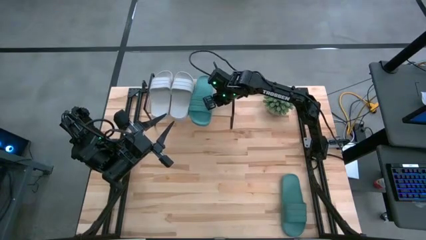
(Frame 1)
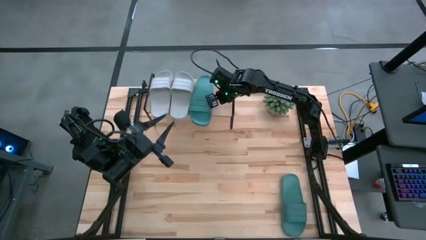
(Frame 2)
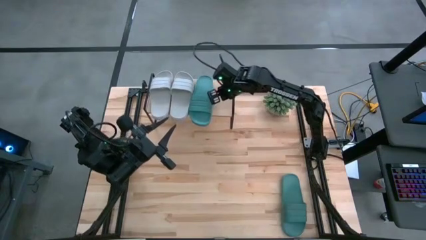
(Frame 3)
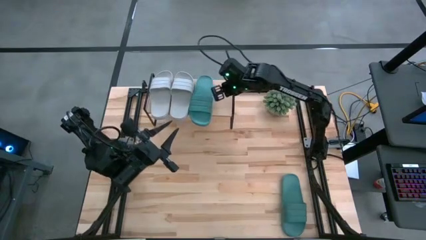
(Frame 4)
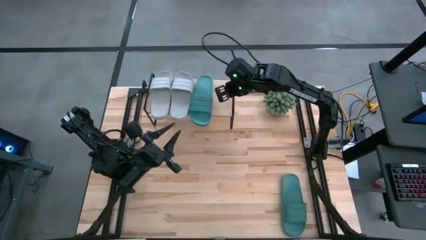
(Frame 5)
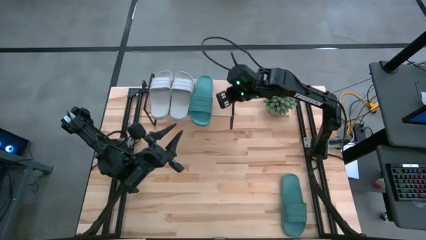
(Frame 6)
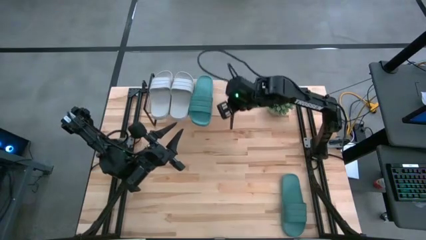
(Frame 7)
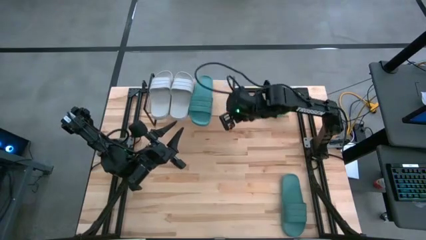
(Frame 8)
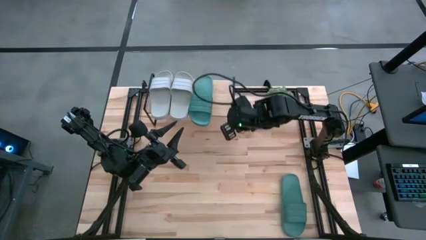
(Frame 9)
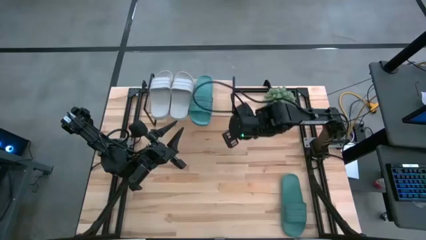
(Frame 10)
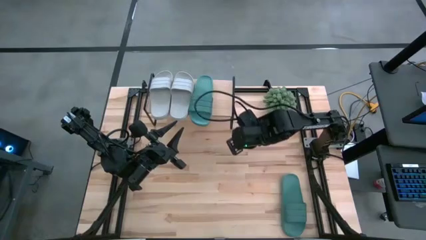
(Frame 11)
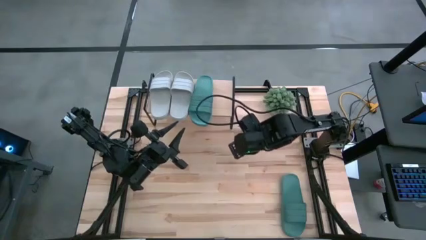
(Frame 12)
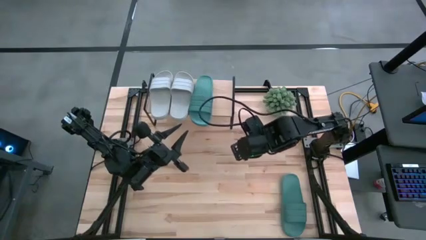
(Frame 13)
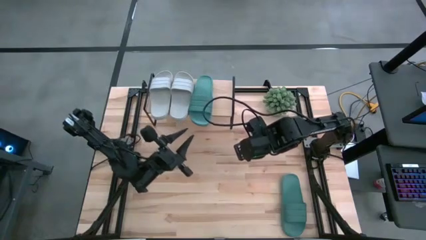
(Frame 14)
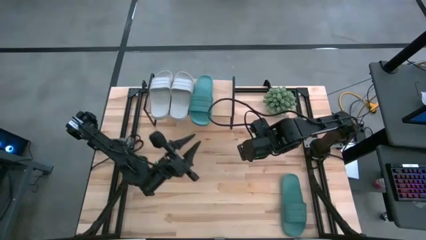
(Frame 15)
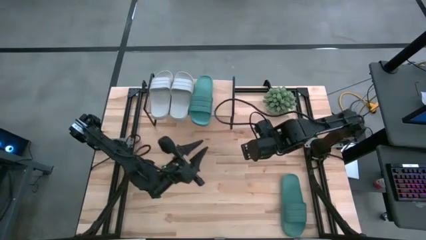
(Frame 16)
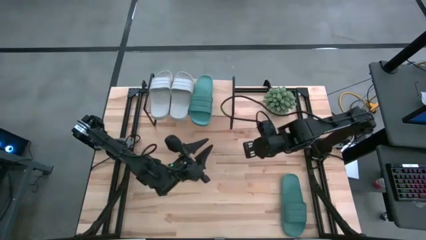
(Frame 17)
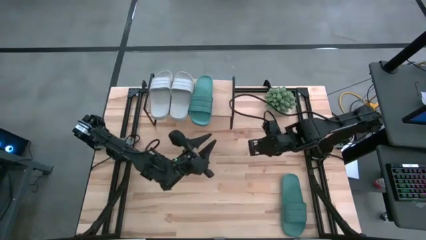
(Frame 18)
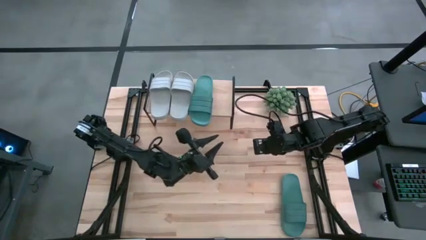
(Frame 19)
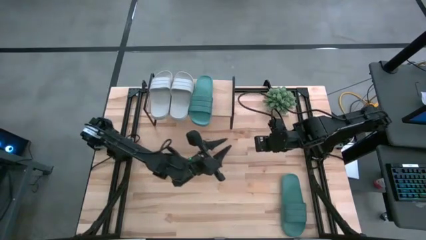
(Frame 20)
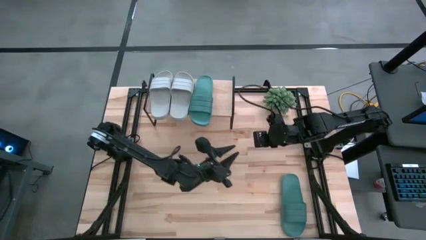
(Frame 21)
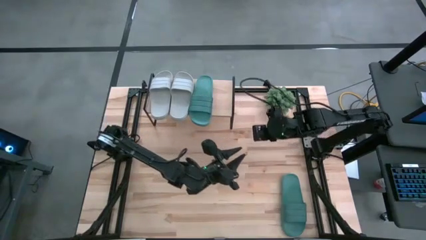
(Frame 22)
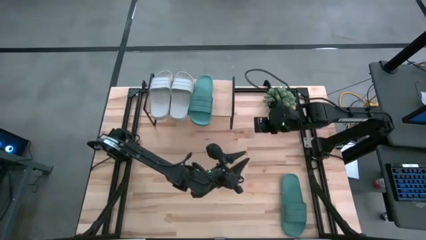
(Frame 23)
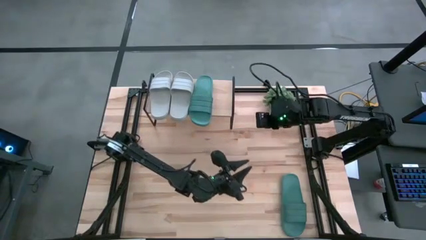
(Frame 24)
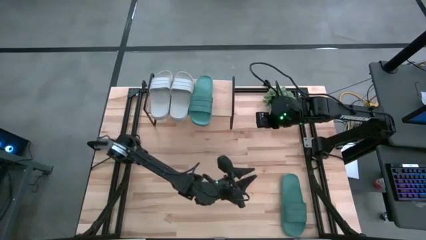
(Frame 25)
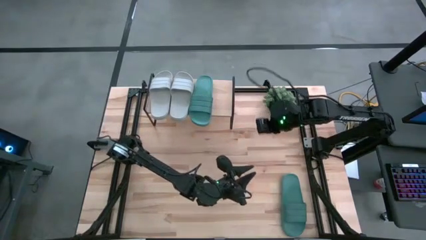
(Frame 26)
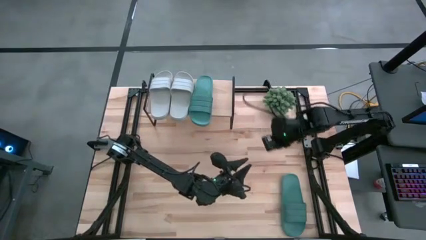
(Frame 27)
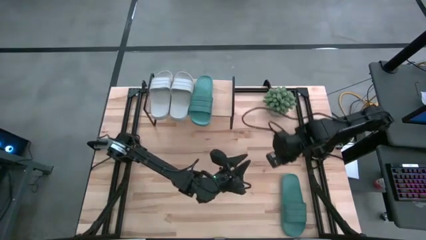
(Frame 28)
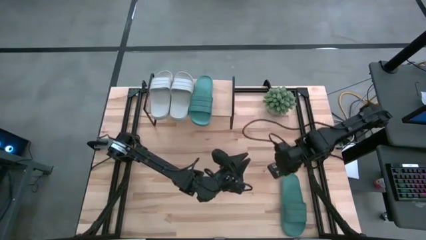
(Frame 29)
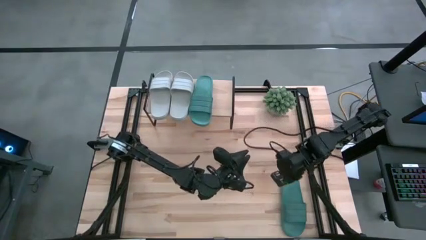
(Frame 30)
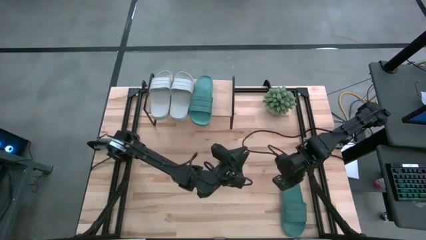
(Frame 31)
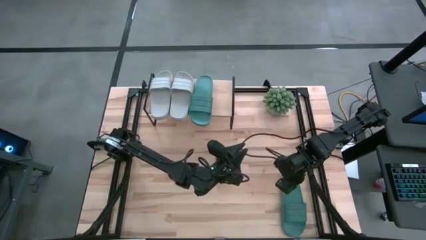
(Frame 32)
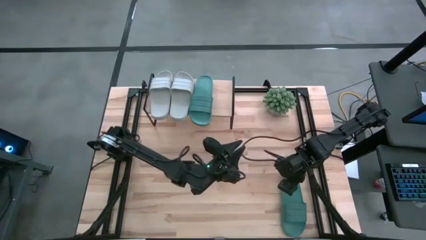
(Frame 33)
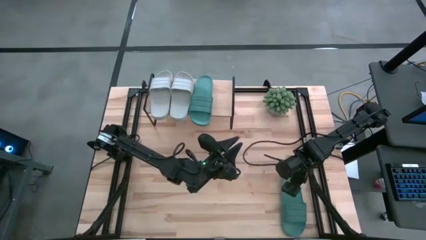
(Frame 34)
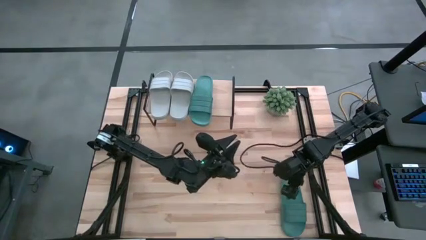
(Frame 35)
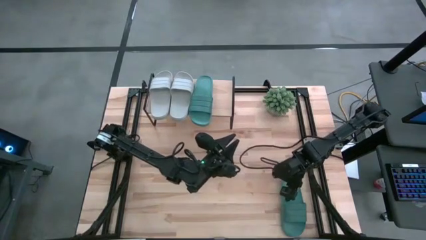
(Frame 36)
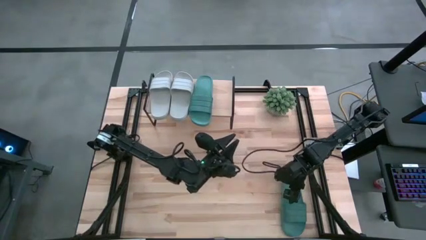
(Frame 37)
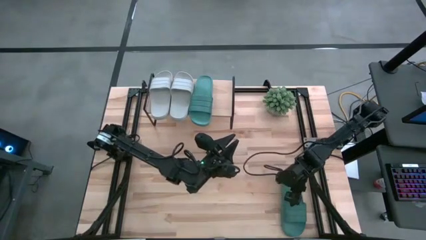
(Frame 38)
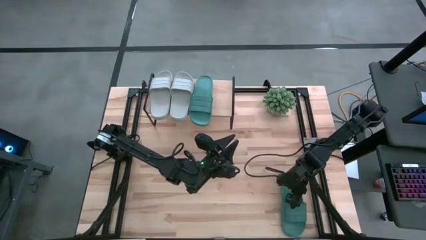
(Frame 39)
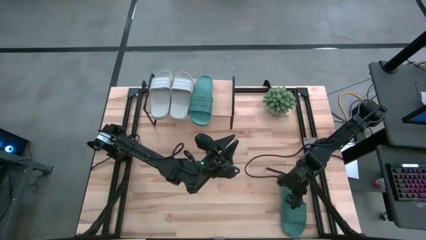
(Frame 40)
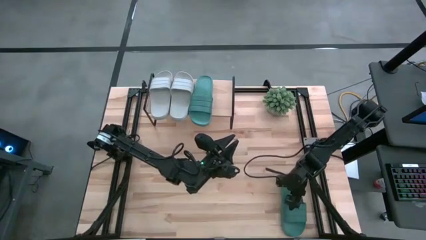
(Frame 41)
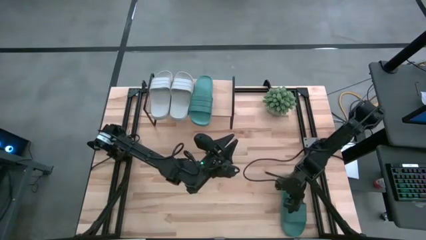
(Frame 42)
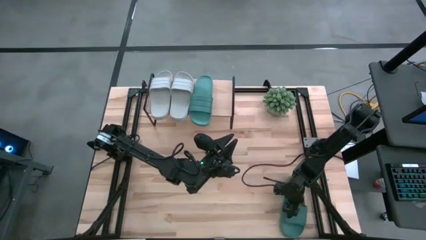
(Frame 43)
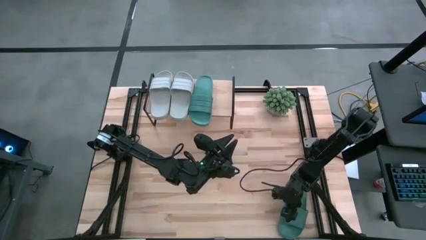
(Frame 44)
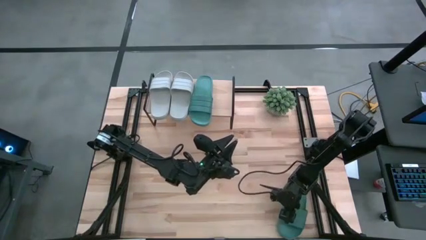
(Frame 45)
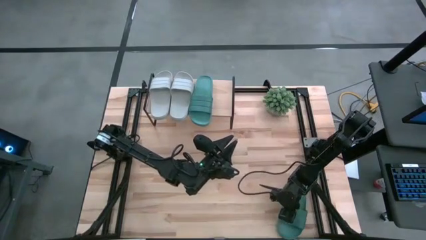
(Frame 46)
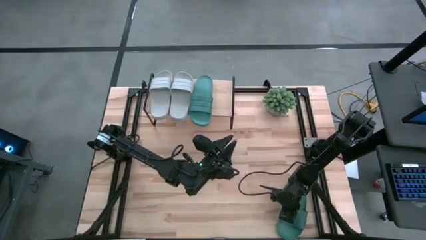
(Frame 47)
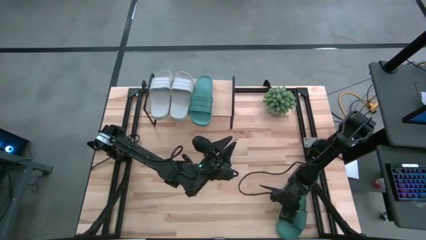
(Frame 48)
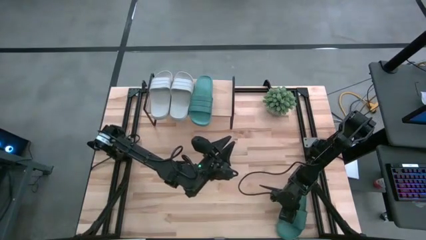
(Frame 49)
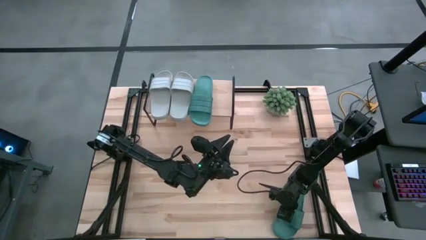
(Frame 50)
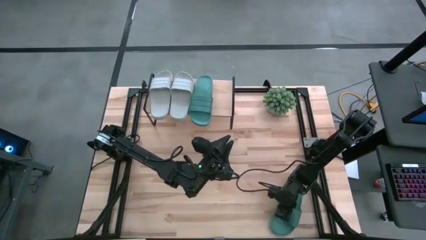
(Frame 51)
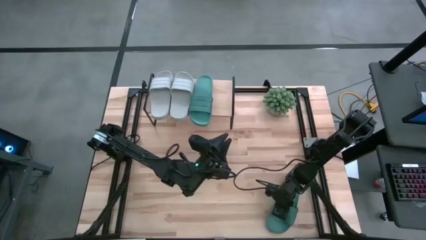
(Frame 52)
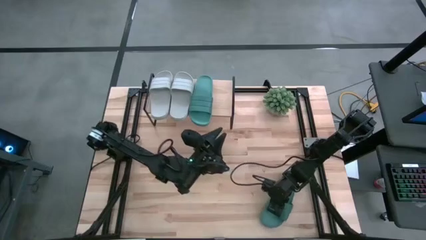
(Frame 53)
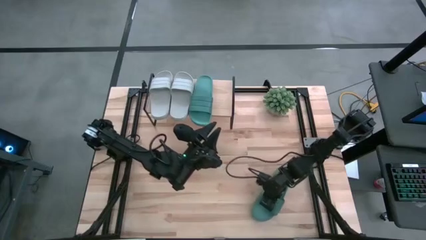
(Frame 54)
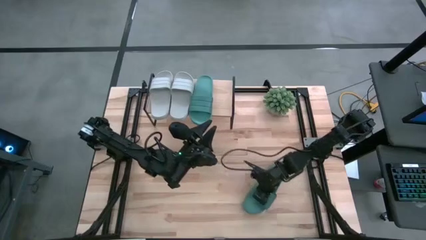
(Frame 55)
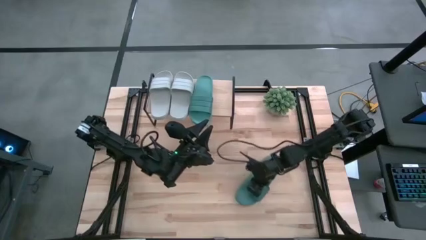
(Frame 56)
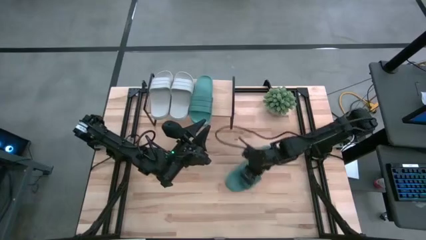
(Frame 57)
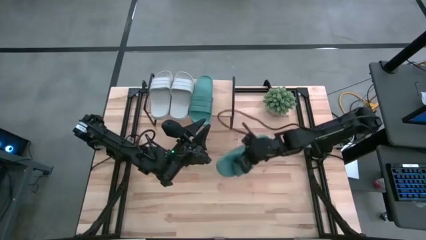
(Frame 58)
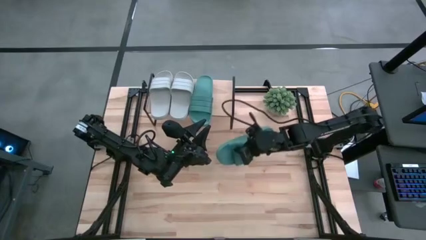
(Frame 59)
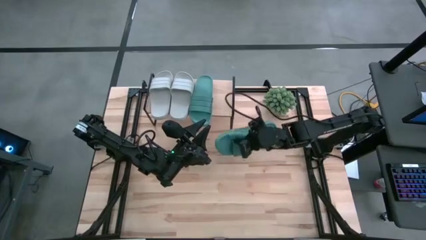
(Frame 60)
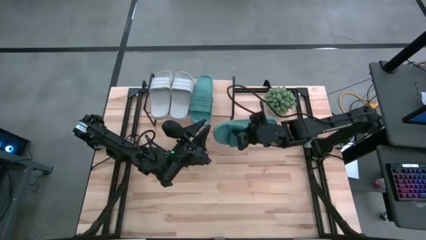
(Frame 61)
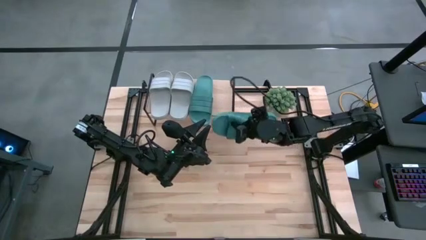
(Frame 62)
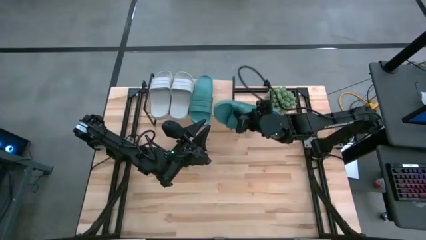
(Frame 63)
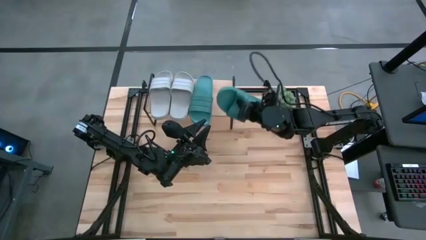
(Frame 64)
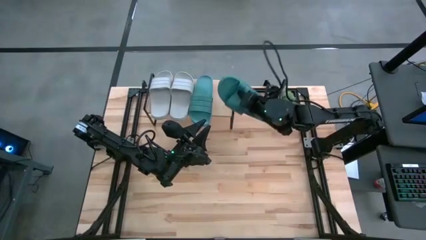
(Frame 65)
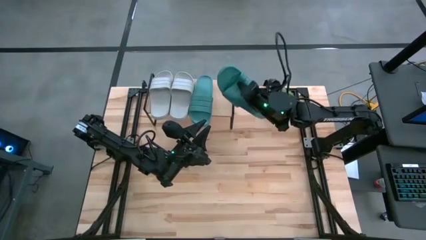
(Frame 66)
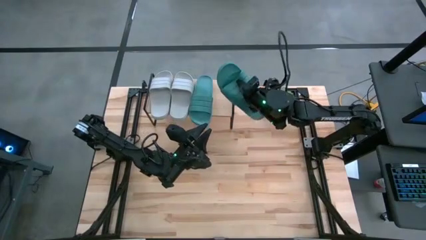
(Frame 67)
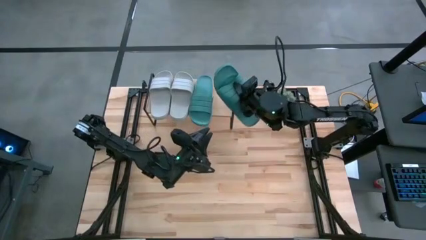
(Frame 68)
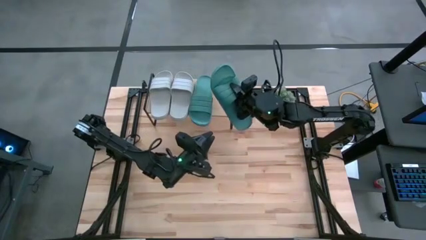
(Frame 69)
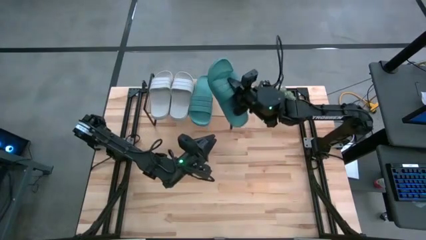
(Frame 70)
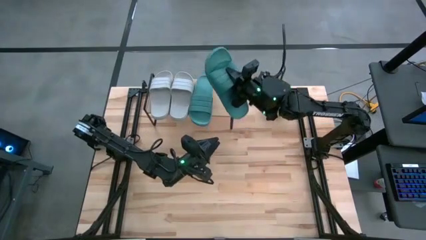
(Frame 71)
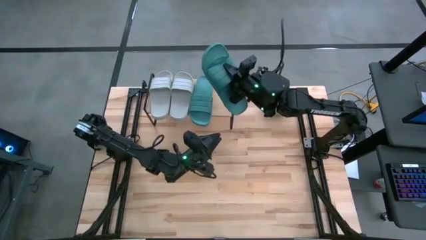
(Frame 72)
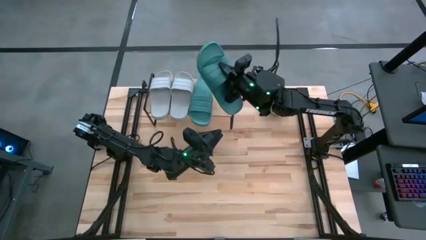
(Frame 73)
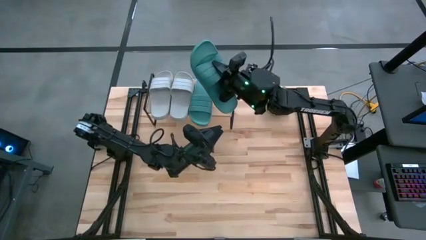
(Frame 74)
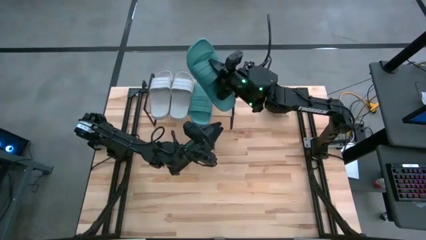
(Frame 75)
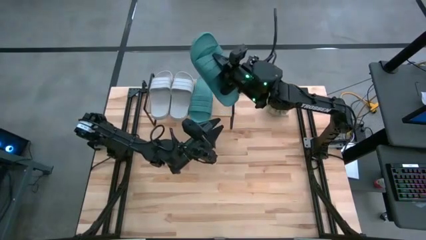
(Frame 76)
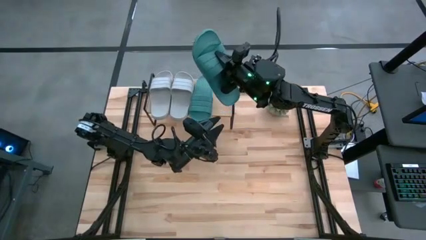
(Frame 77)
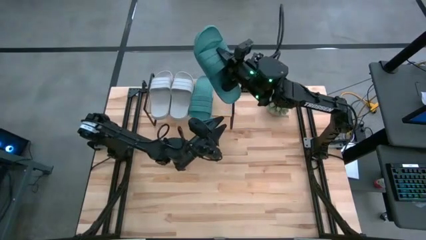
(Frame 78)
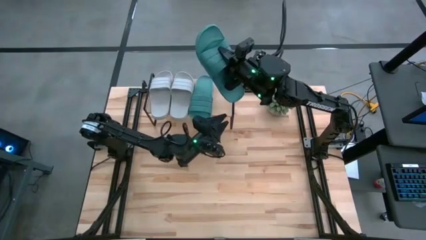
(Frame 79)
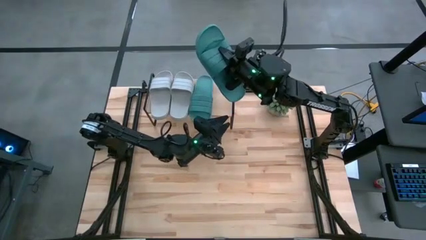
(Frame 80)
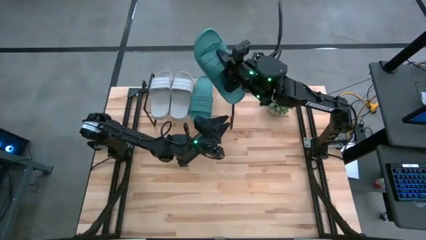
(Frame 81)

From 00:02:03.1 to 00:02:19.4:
Task: Pick and place slides into the shelf
Put the green slipper on the shelf

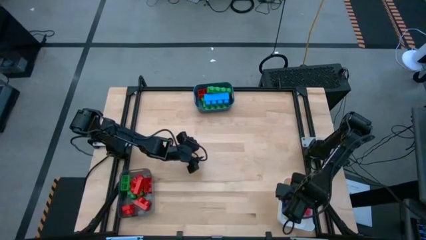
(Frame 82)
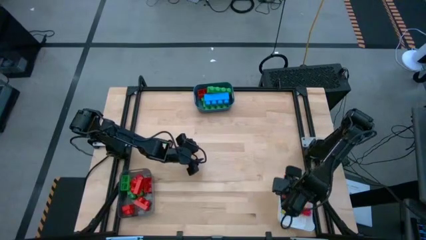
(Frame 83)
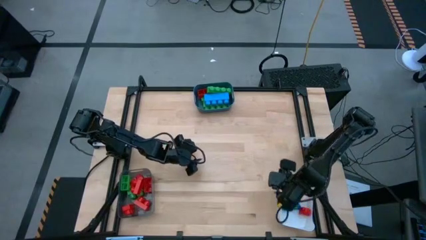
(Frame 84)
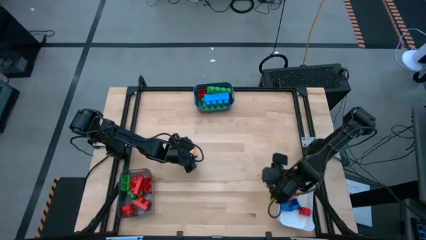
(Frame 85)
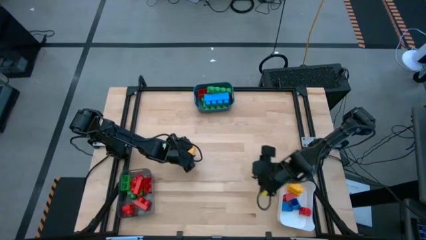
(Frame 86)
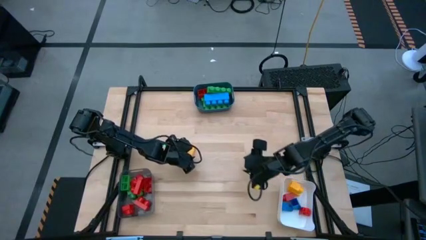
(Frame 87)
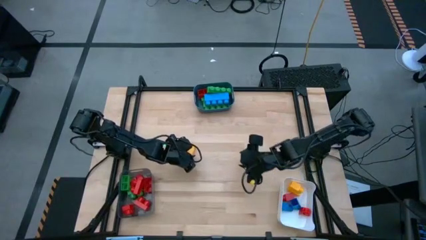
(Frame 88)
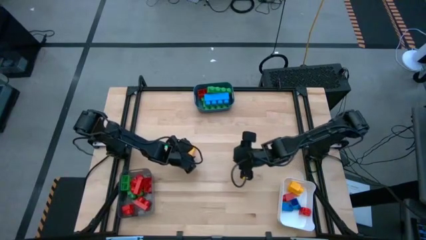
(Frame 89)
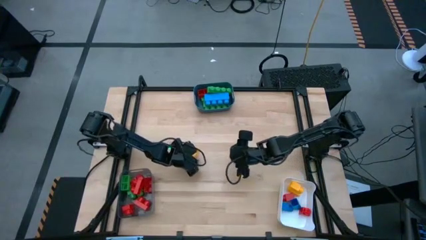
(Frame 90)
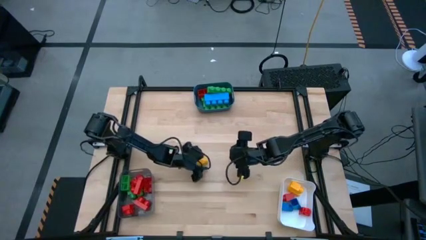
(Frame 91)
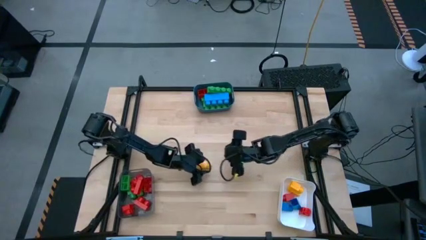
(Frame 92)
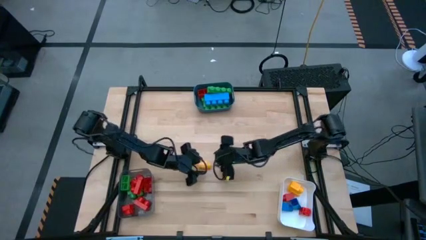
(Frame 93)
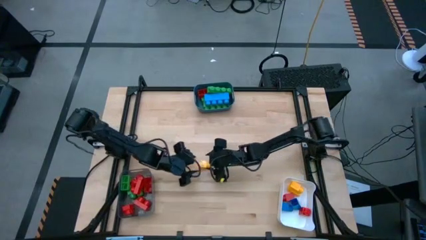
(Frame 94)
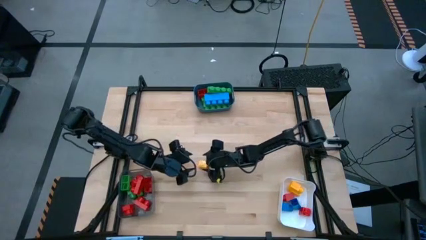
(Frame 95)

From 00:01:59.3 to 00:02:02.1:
Task: Sort blocks by size
Move the yellow game piece to the middle of the table
